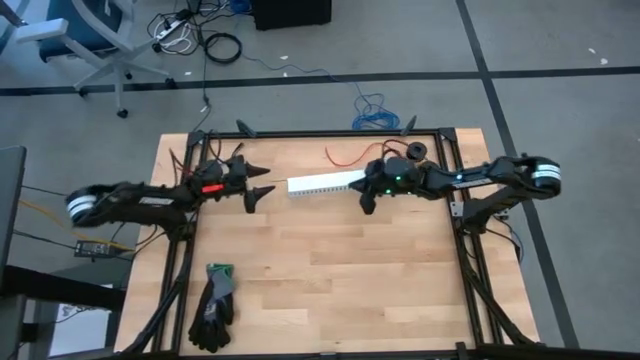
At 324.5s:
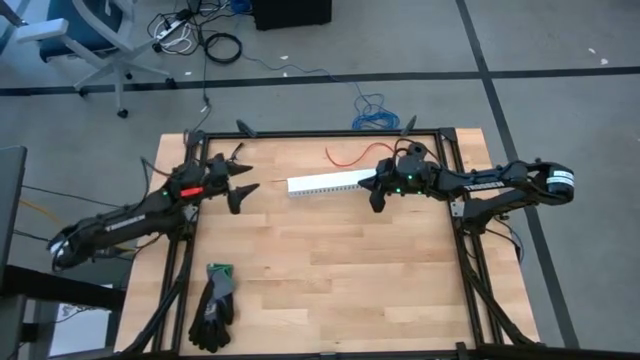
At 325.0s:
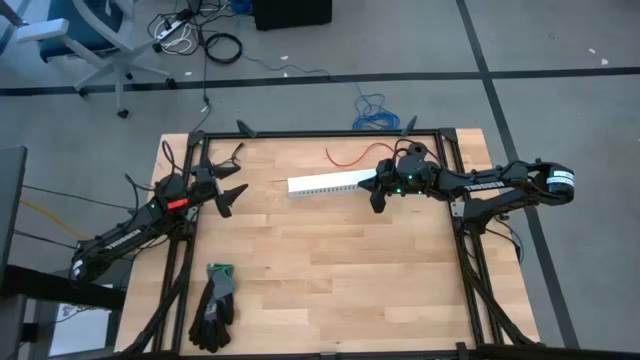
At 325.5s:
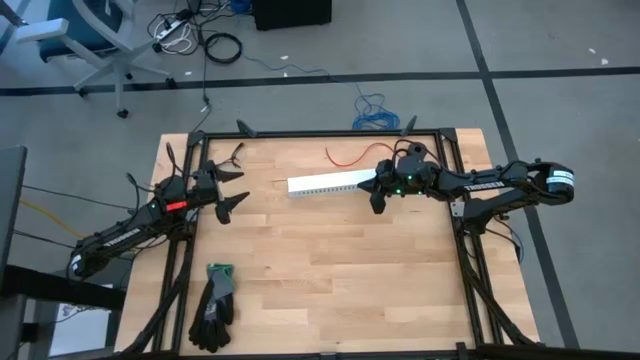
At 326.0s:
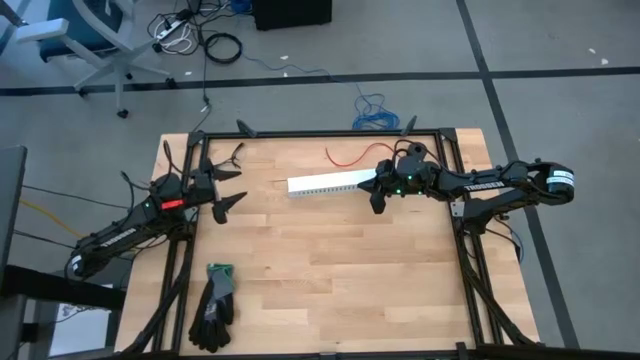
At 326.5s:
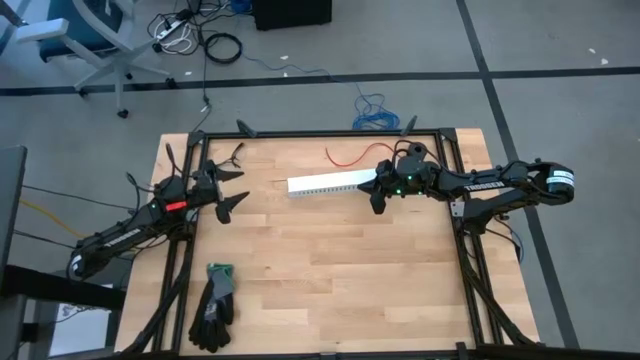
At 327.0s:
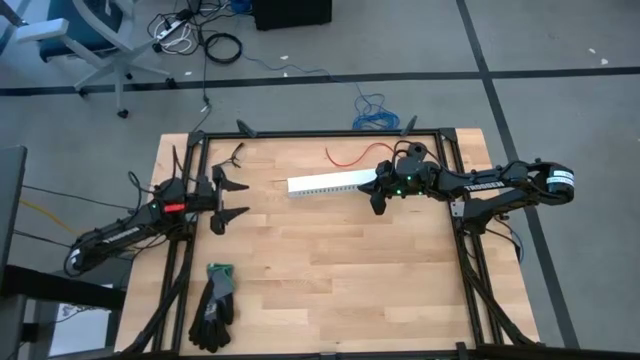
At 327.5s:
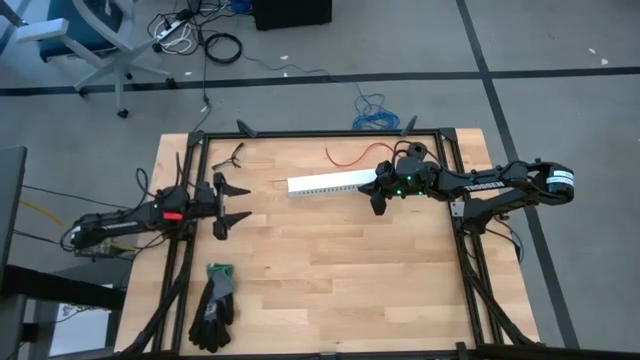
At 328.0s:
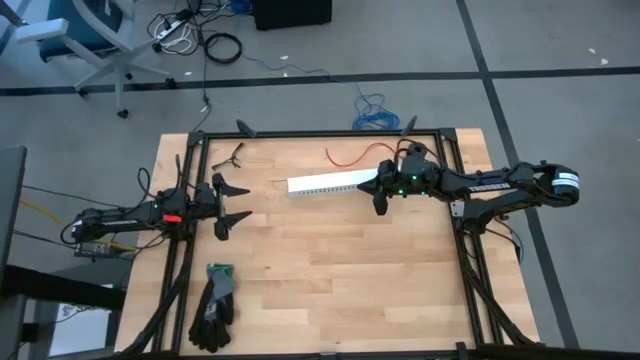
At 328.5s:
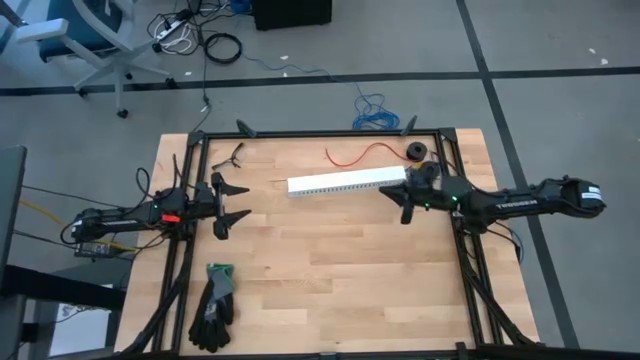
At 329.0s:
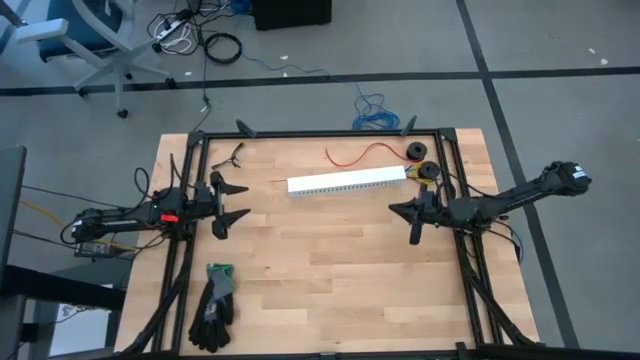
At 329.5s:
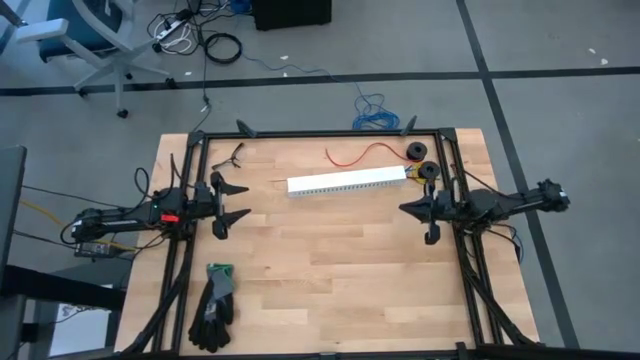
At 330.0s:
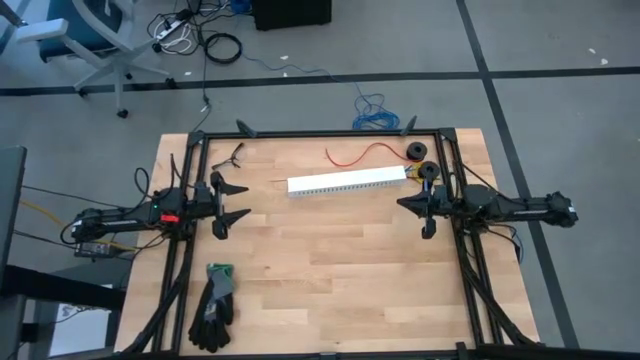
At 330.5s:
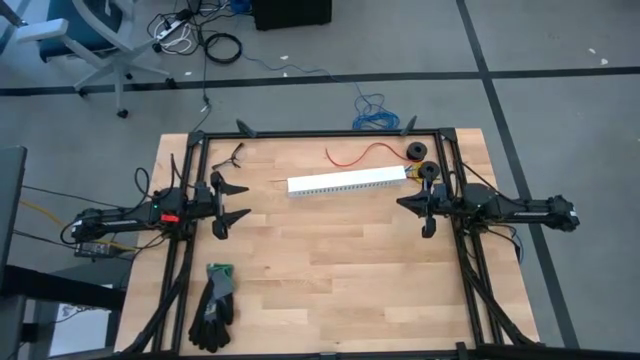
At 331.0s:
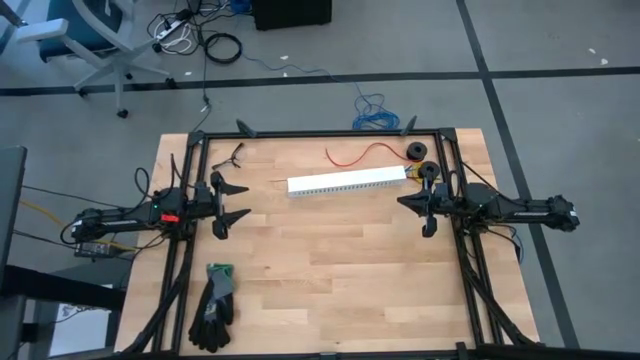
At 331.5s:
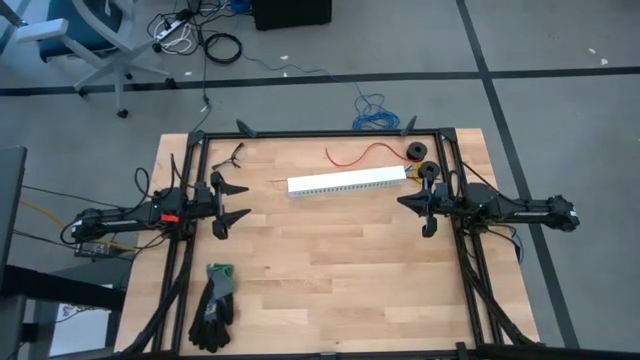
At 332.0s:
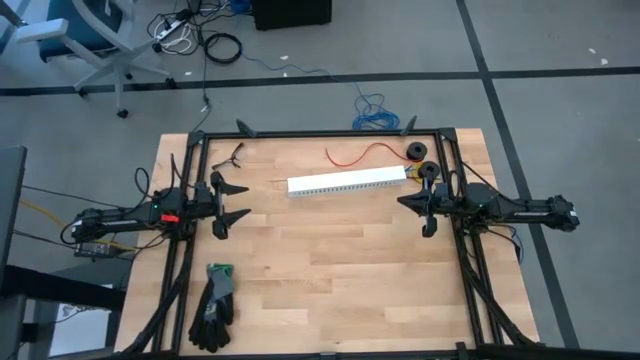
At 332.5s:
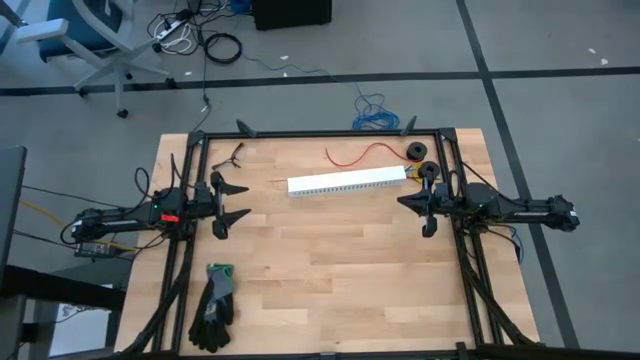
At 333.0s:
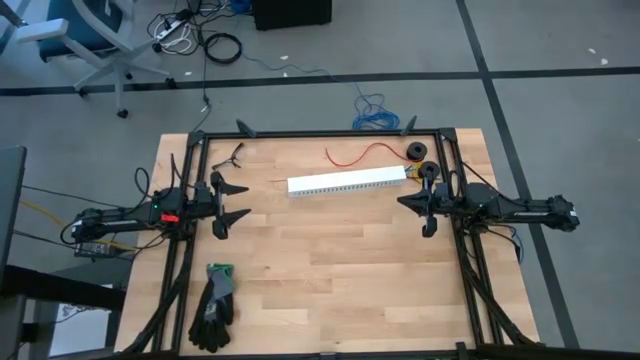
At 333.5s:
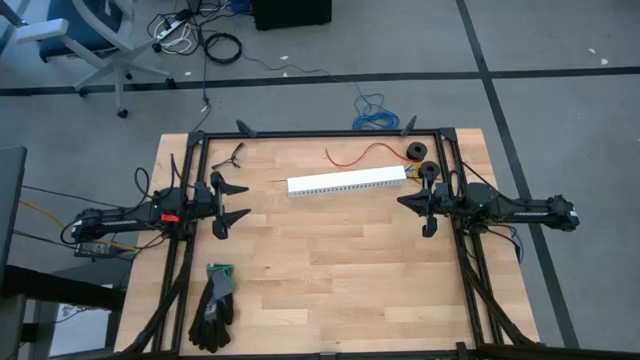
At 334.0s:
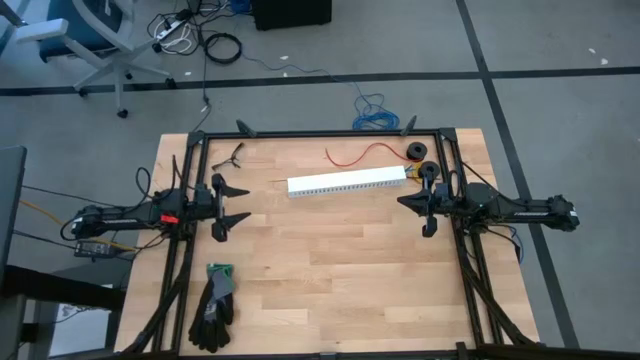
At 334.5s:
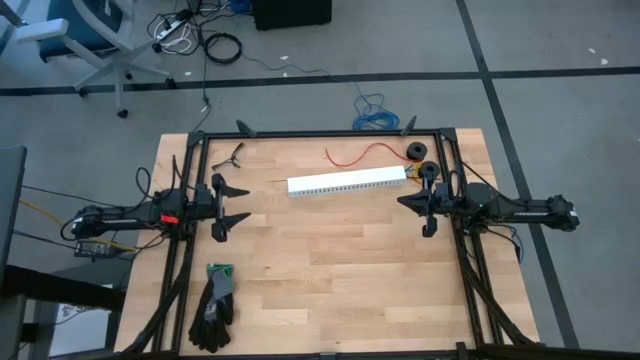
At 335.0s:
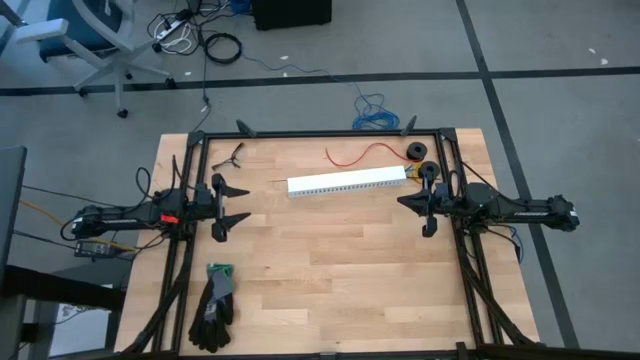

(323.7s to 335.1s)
Task: Ziptie cables
Return to Home Position

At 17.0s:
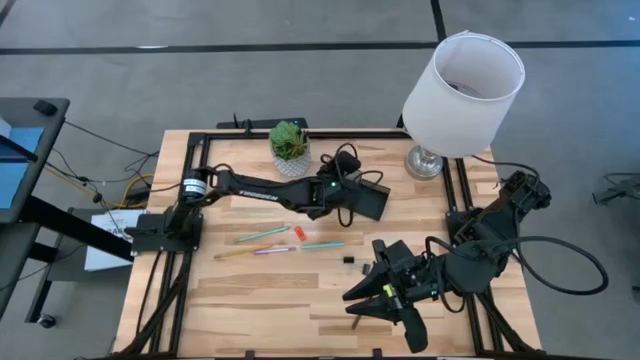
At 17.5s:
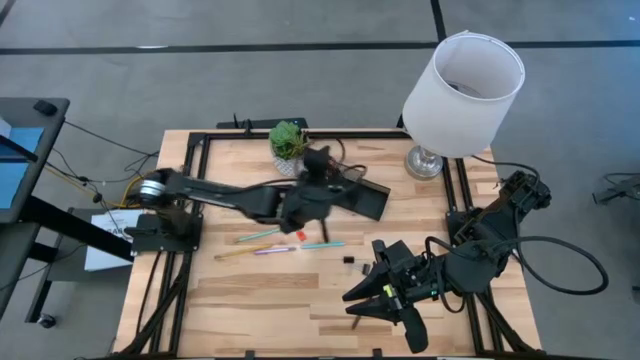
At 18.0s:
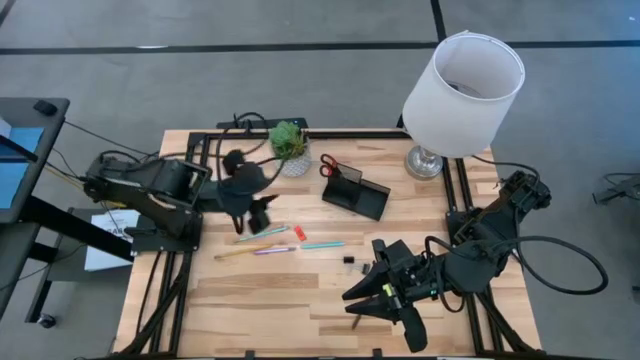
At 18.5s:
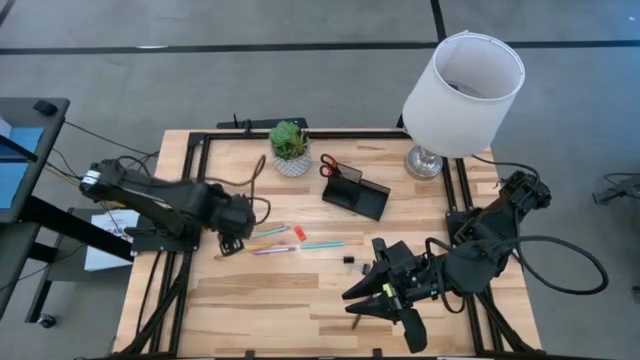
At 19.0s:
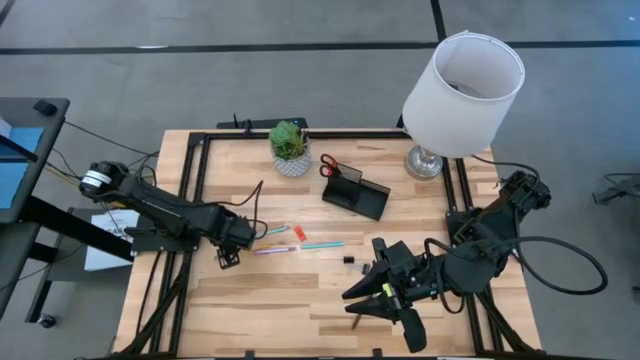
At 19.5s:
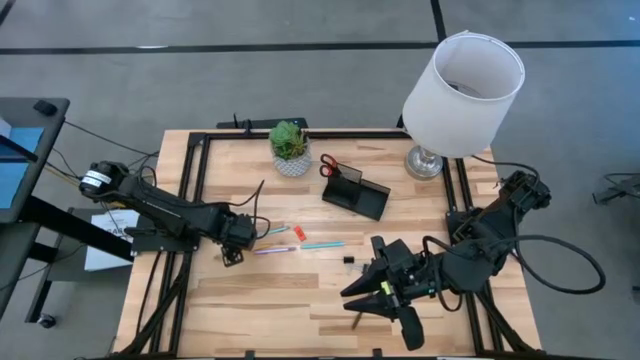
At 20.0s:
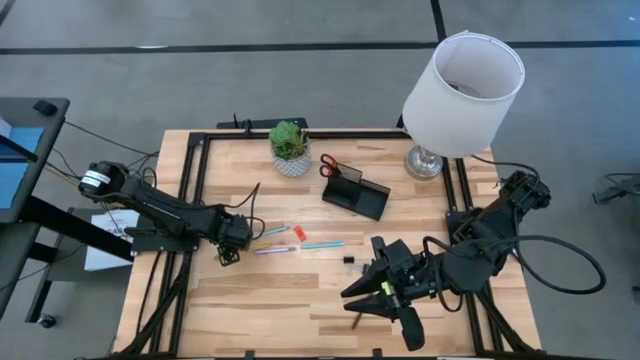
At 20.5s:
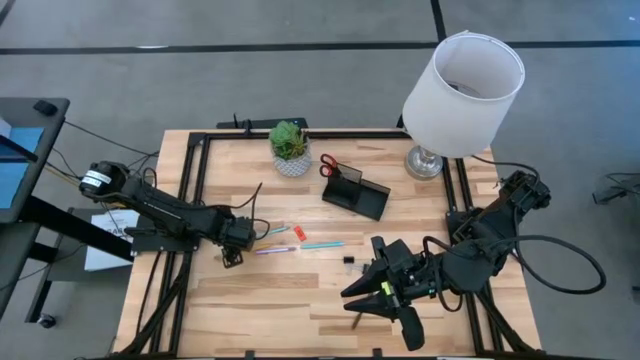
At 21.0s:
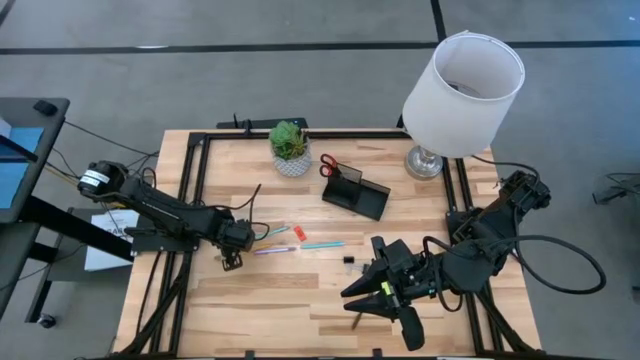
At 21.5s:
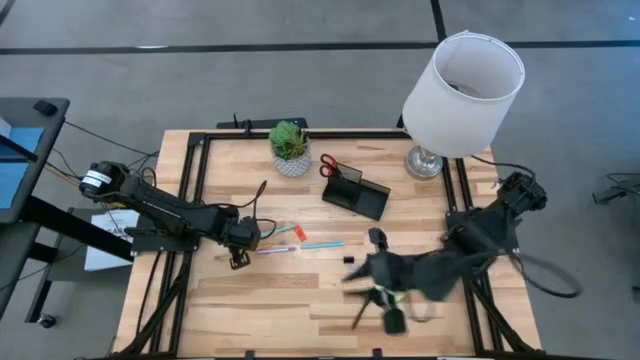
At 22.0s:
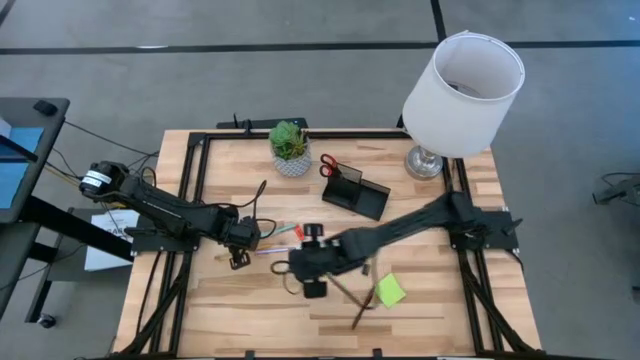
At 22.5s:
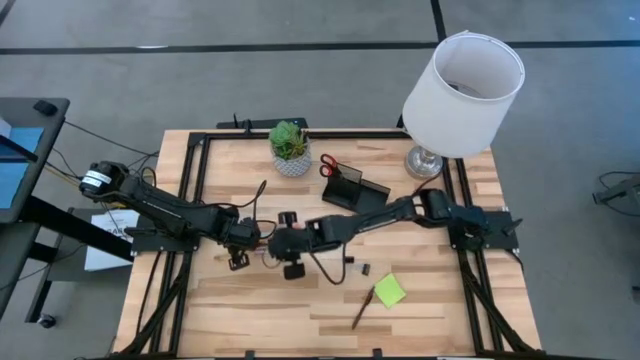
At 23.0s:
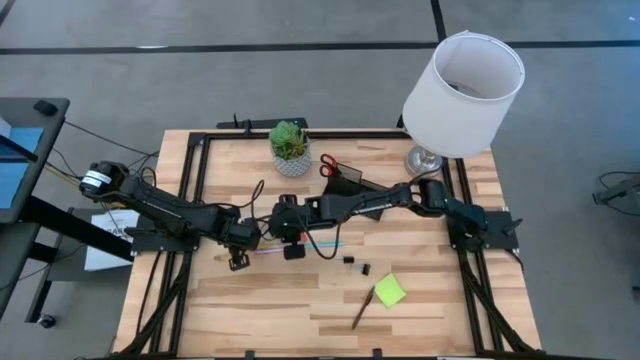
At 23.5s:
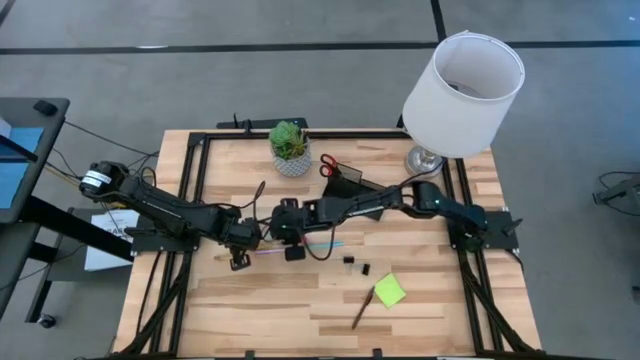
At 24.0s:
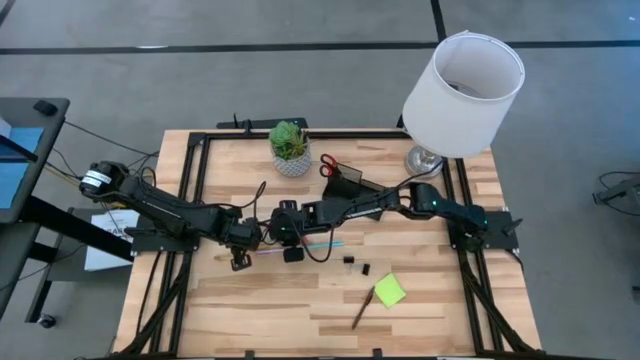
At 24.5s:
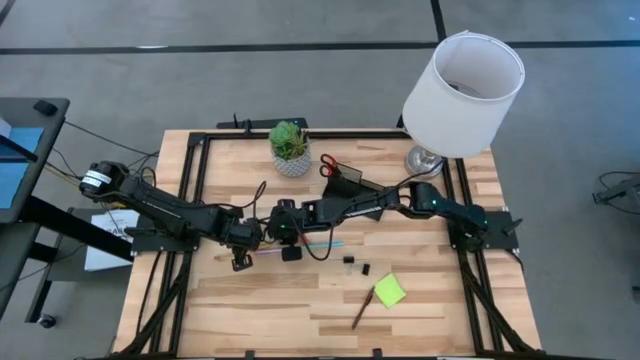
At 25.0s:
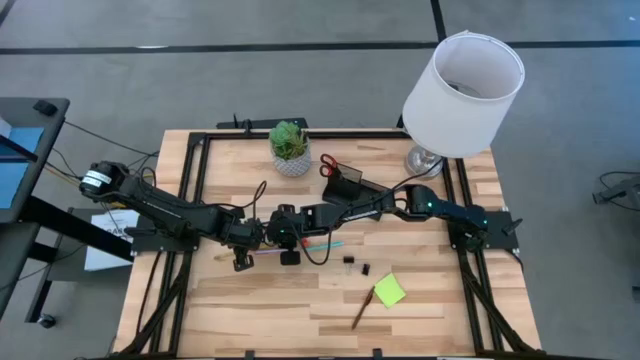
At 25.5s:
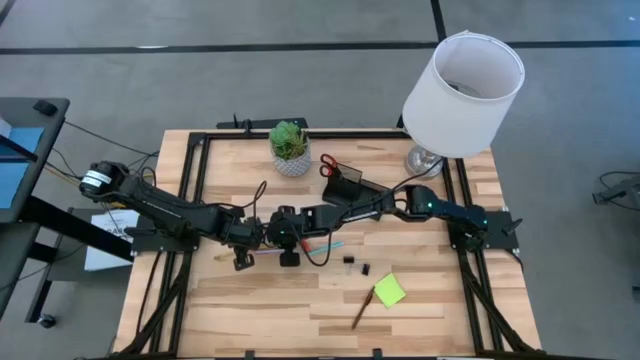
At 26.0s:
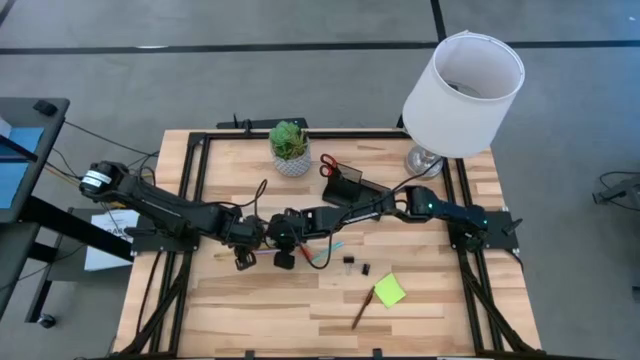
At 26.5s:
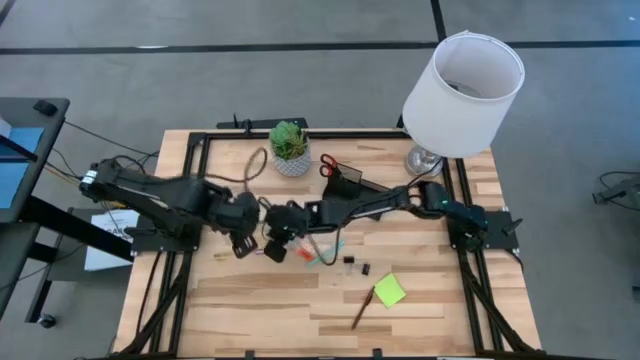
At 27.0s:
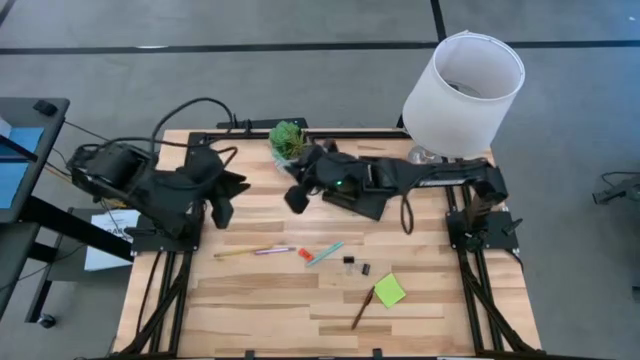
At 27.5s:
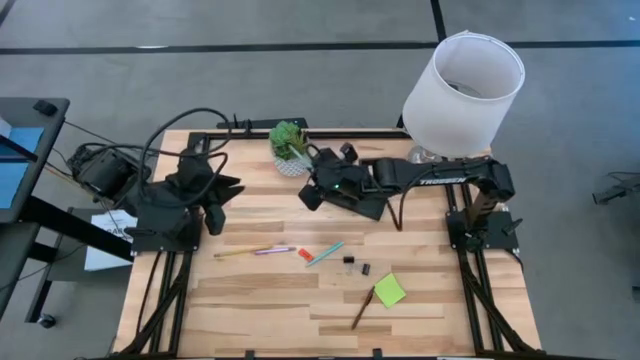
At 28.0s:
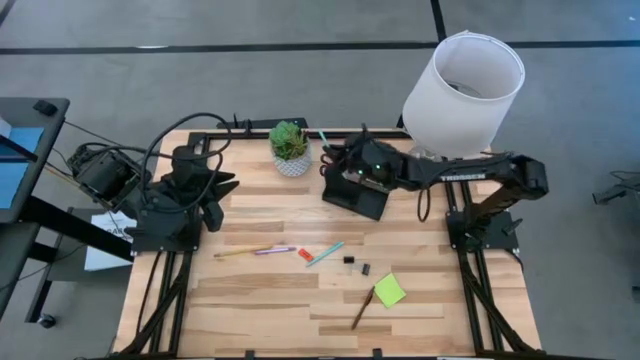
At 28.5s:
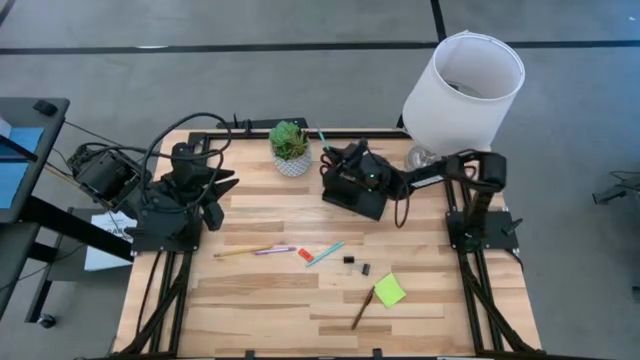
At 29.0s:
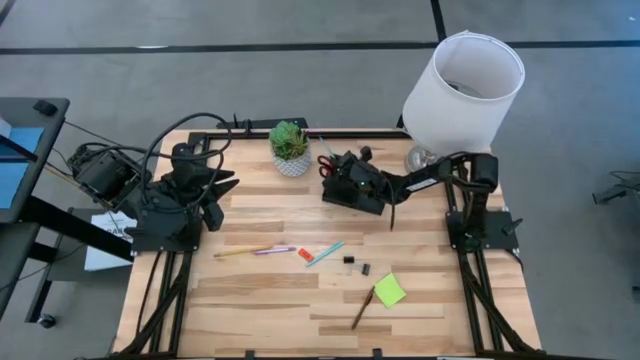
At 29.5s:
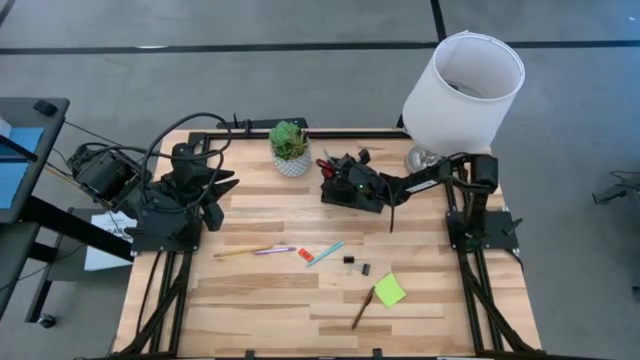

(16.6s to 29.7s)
Task: Pick and place office supplies into organizer
Put the blue pencil into the black desk organizer
